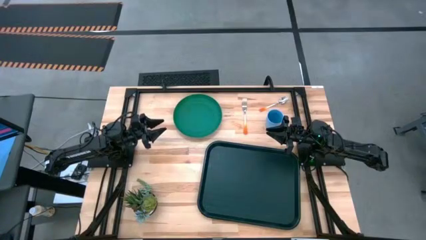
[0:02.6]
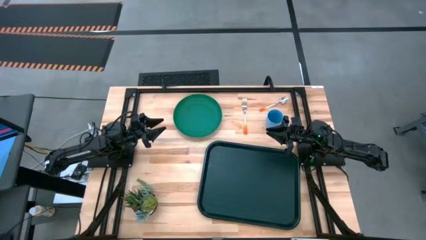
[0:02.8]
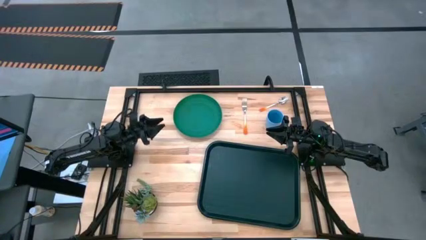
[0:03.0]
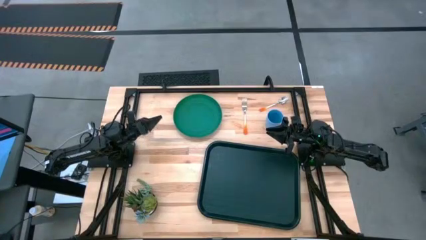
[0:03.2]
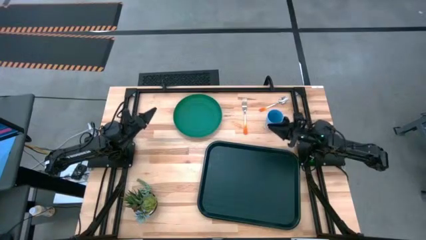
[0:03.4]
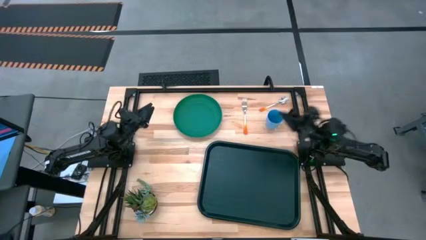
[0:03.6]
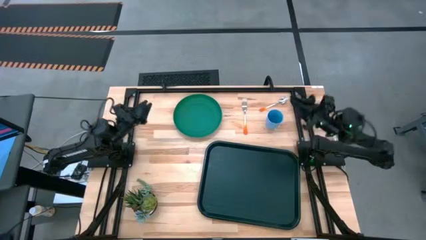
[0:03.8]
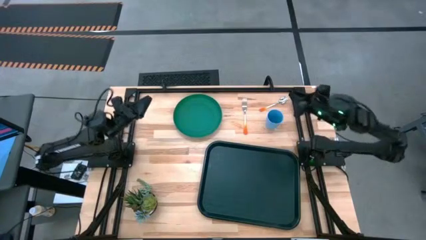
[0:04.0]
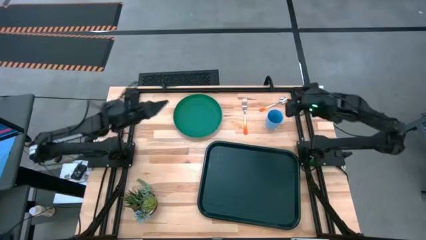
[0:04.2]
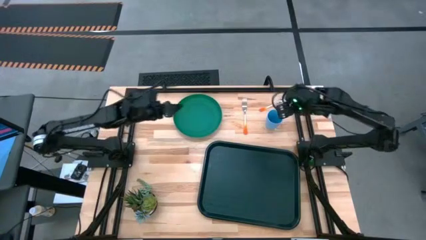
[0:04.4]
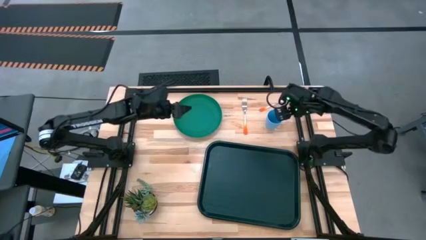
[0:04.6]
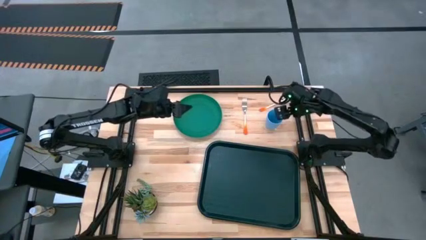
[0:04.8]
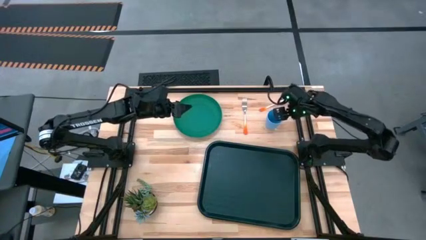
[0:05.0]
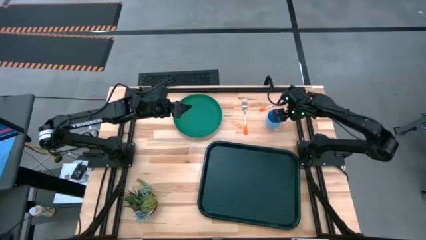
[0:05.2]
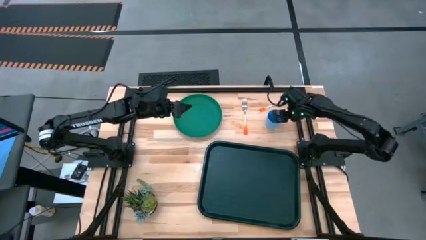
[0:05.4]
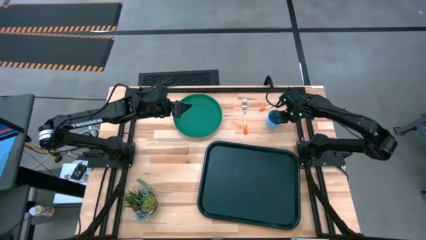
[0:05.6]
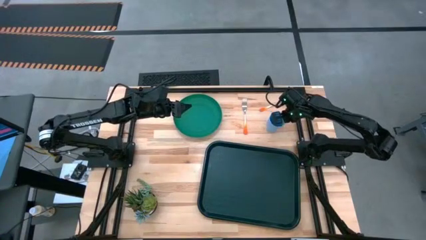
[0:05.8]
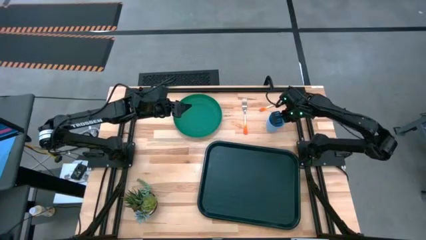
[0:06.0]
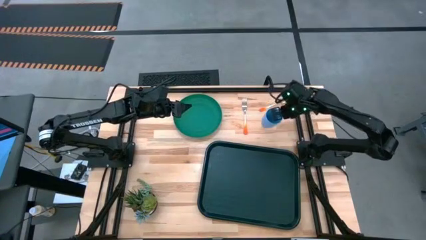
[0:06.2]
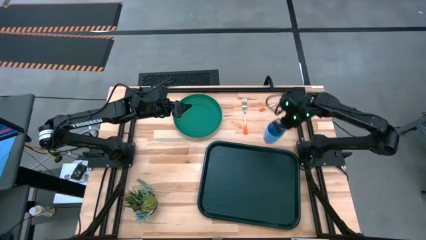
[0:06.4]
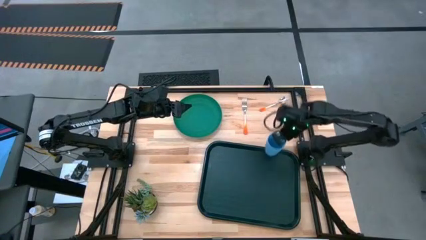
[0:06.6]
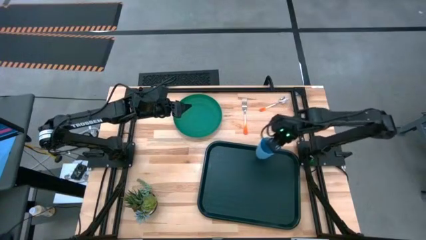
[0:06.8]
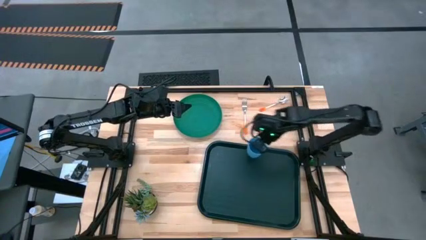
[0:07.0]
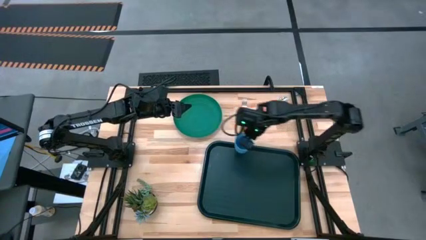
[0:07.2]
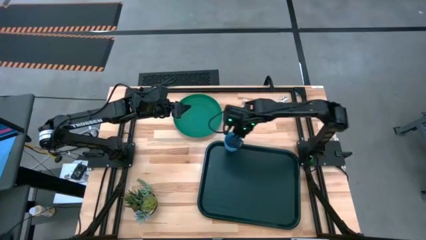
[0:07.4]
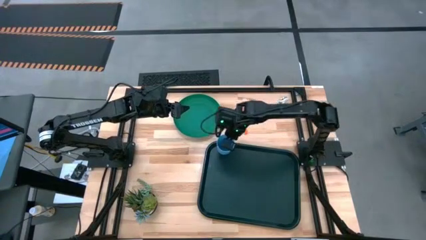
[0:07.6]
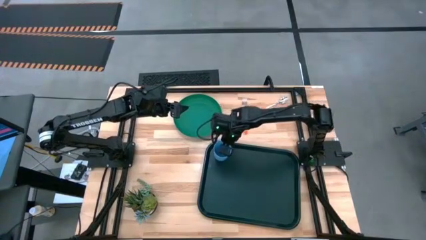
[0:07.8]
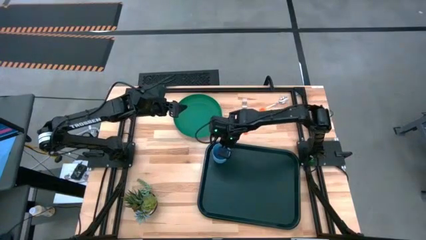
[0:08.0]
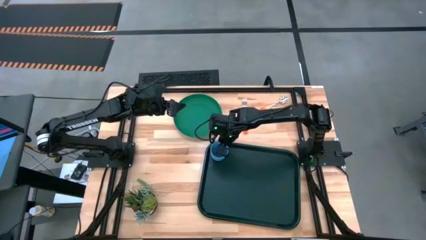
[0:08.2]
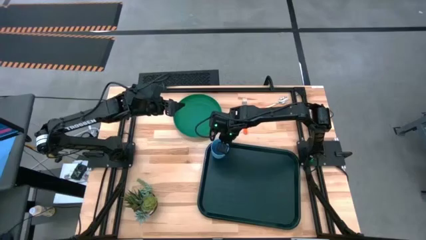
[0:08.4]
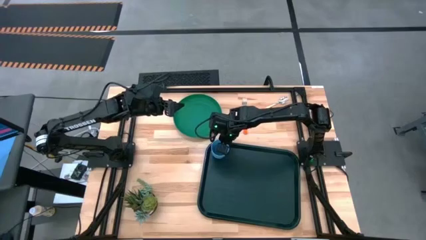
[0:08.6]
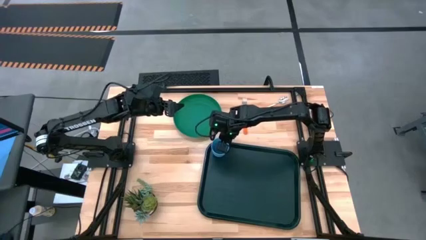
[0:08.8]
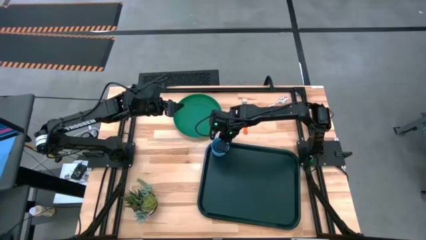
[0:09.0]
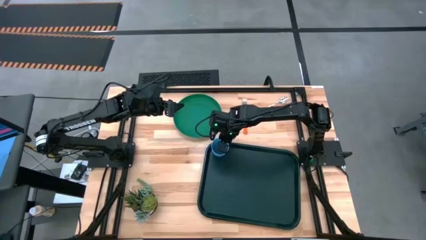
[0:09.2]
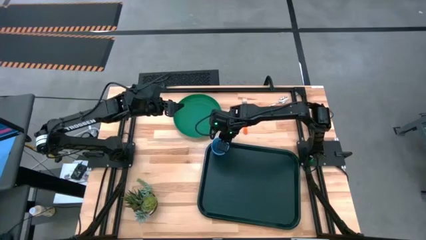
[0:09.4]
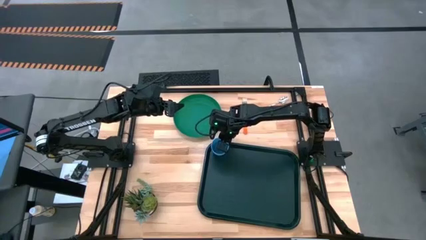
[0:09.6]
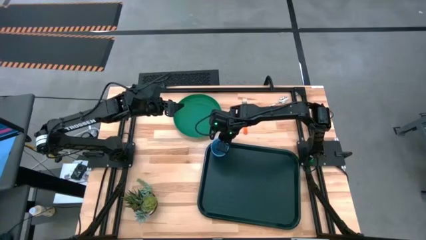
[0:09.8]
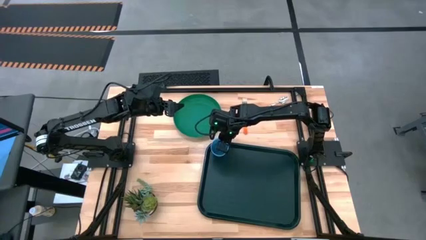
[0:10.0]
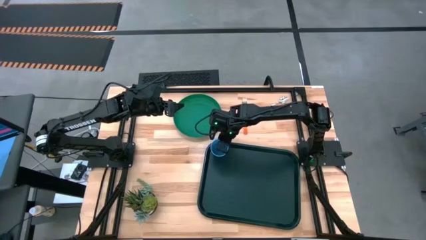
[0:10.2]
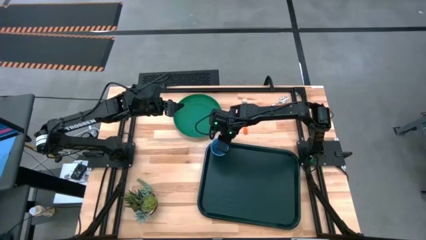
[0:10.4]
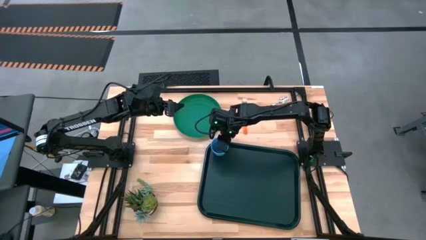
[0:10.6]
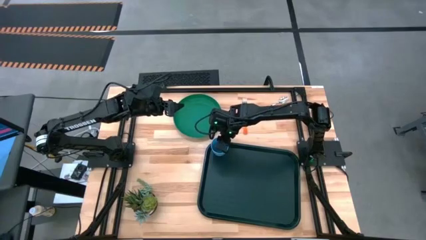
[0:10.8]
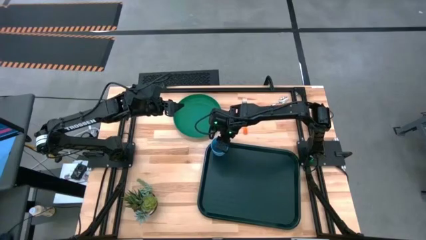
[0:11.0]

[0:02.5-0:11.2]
Task: Pick and place plate/cup/fork/spoon on tray
Put the blue cup on the black tray

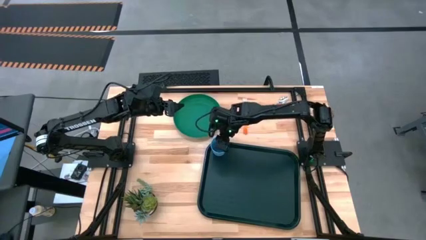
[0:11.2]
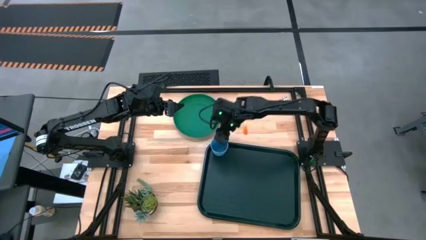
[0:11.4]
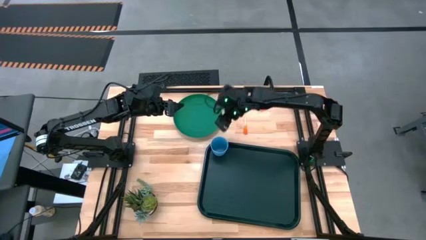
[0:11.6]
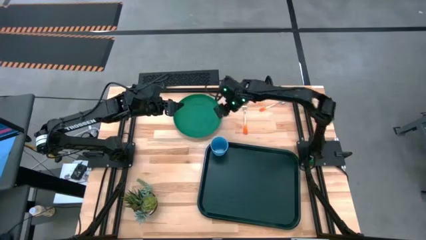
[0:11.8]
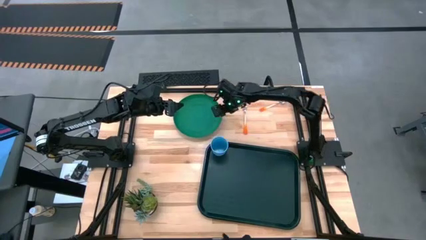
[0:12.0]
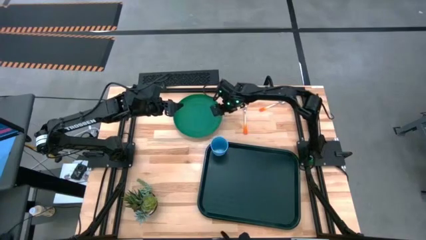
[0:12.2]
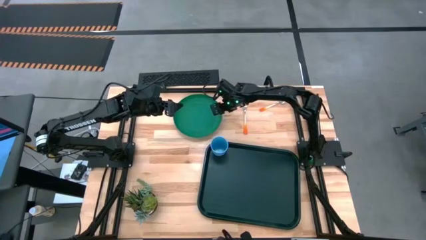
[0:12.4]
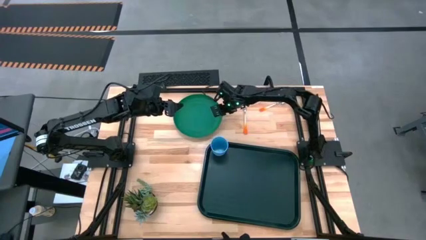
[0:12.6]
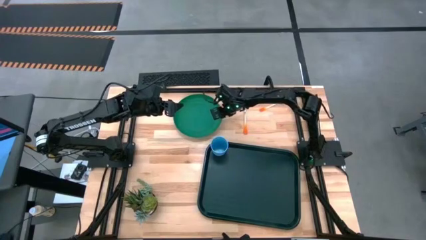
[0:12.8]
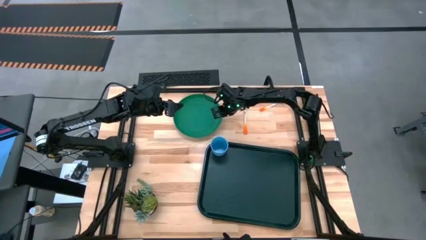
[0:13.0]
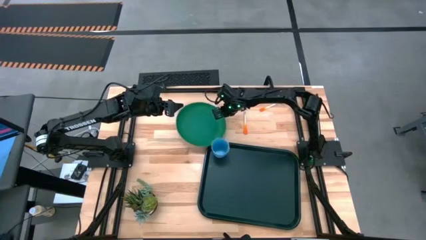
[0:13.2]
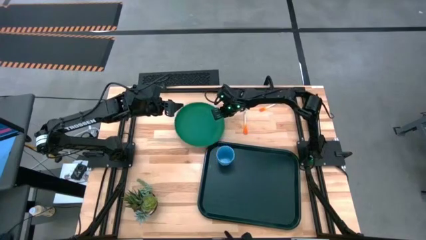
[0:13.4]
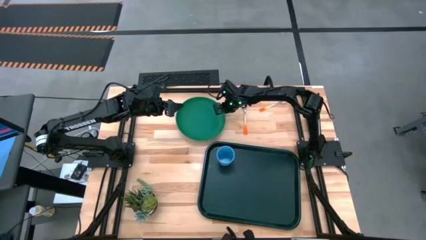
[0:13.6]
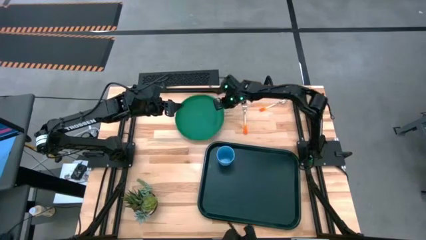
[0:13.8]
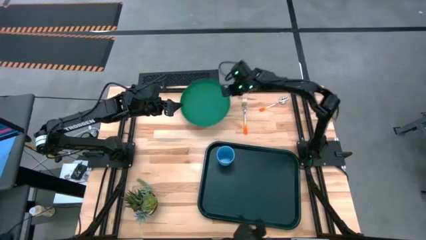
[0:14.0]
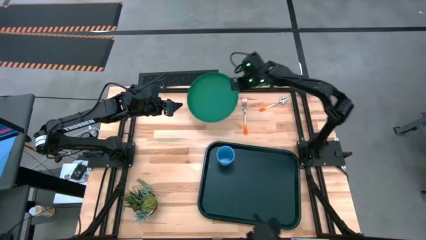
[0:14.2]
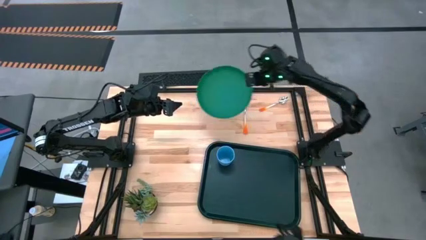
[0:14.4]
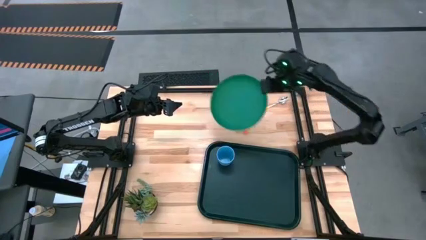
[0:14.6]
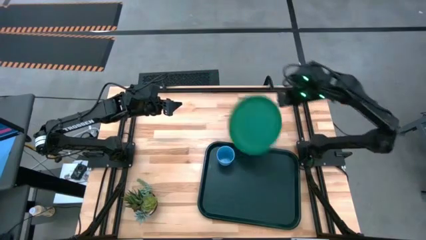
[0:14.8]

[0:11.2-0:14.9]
Put the green plate on the black tray

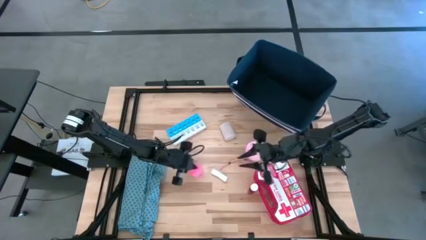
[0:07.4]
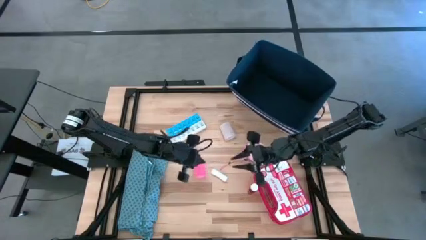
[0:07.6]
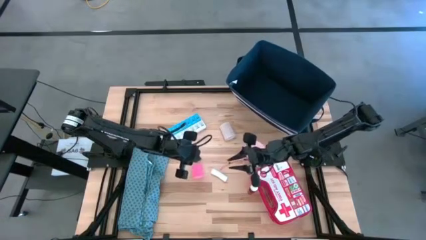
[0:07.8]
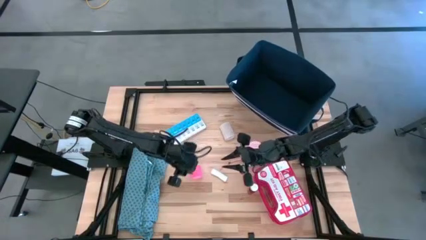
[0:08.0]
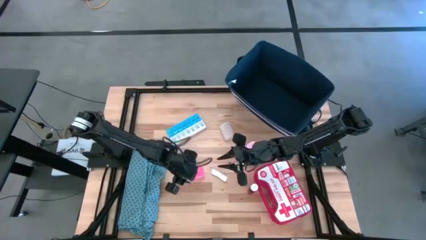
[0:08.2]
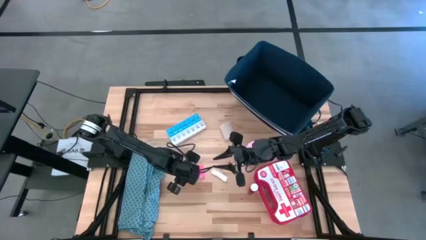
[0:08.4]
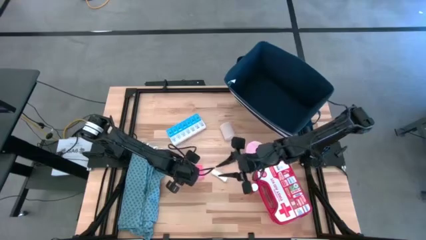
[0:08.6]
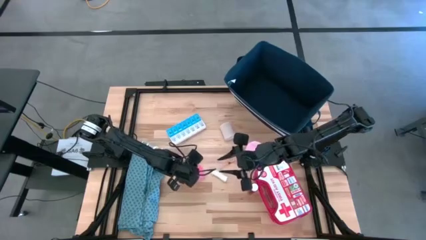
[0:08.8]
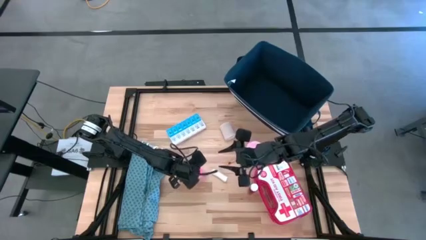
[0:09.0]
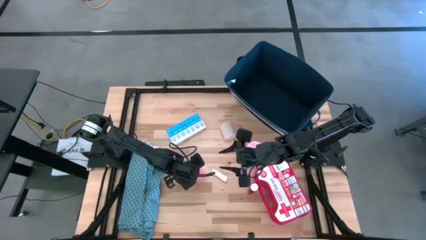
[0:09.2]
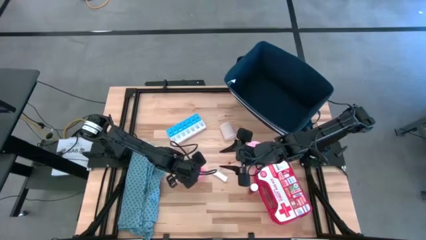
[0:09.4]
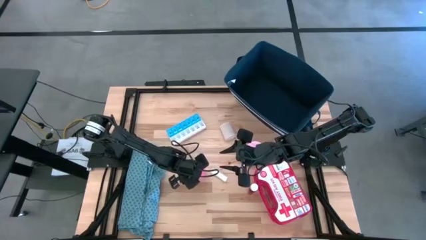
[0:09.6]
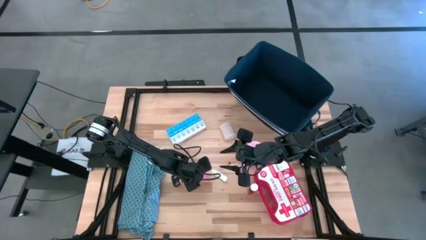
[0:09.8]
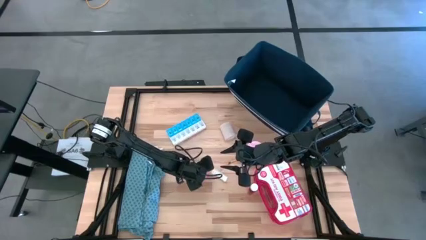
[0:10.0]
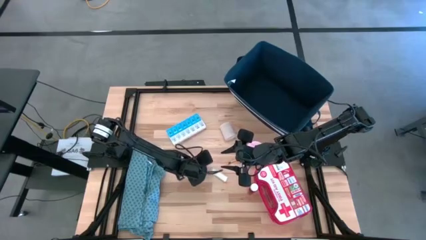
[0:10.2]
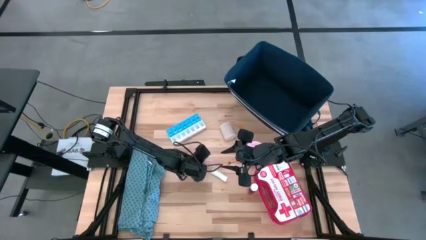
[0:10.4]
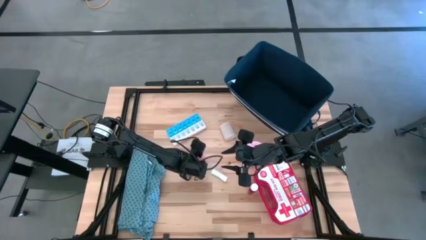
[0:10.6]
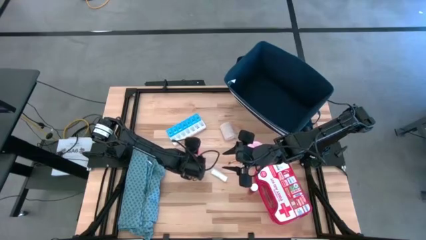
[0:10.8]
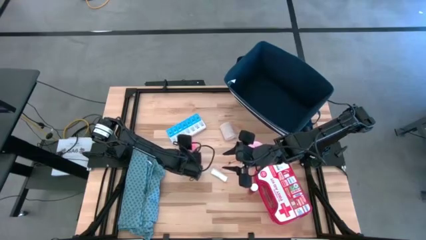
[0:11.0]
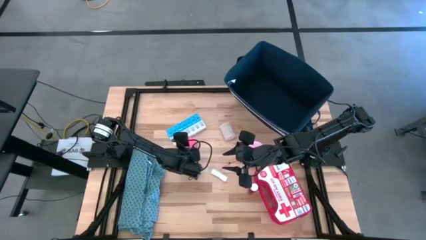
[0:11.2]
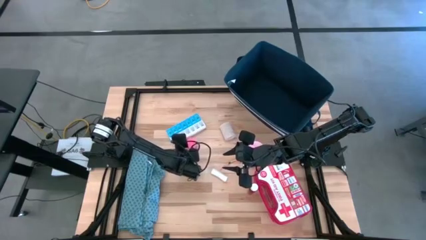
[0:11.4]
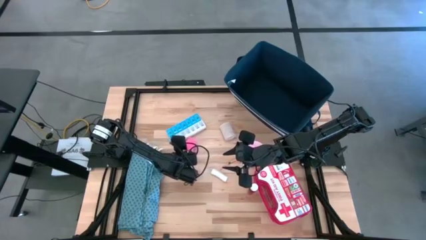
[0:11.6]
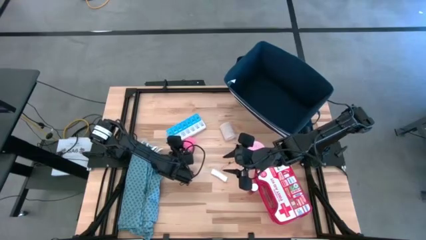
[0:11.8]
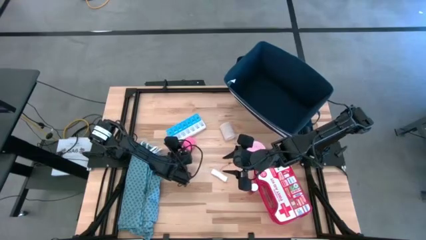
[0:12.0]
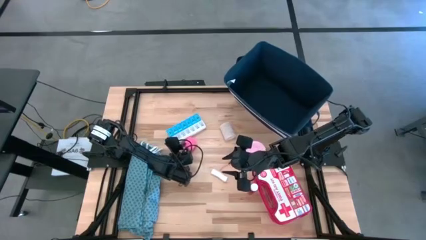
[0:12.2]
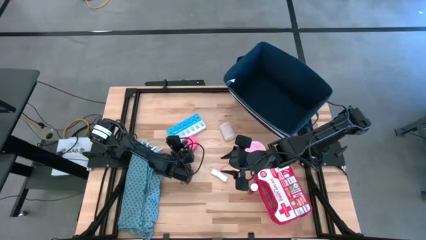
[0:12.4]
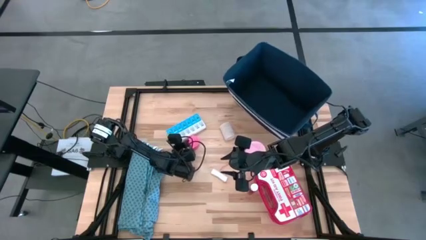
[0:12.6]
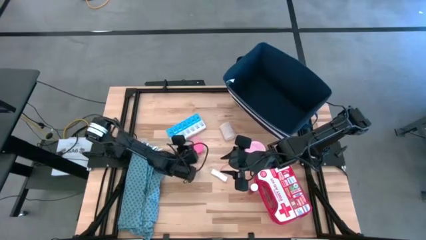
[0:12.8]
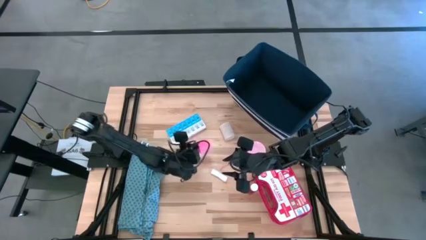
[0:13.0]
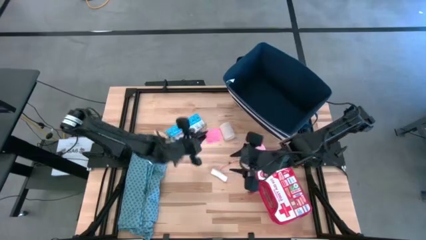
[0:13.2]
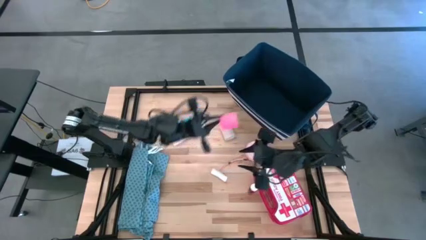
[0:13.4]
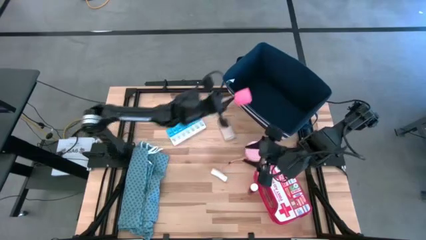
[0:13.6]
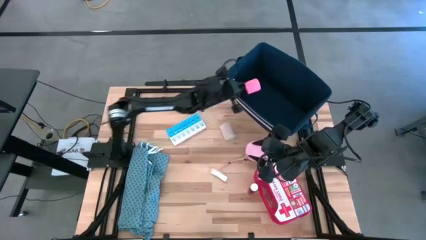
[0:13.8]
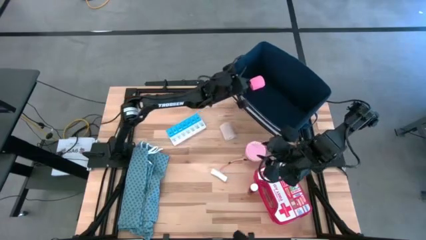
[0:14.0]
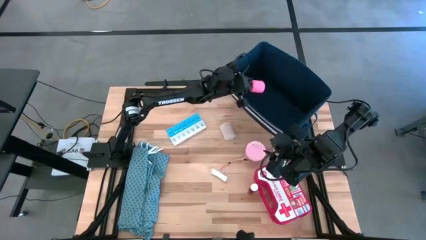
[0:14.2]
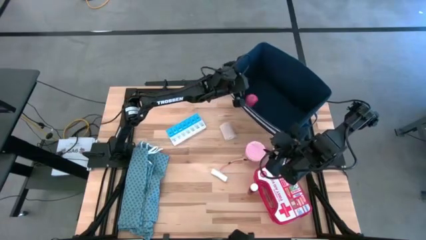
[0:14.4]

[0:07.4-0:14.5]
Task: Pick & place medical supplies in basket/bin
Put the pink bandage into the blue bin
